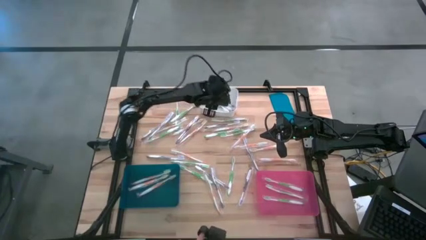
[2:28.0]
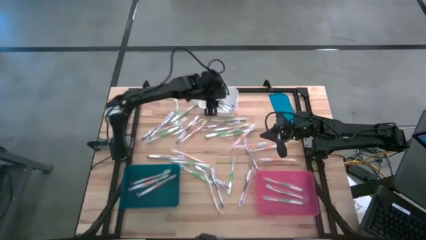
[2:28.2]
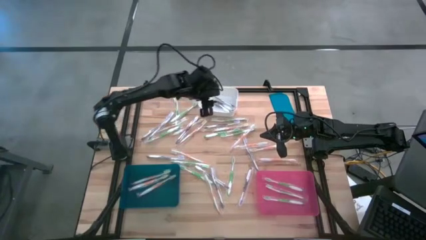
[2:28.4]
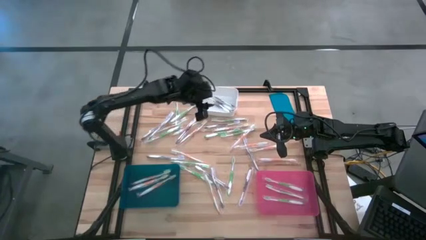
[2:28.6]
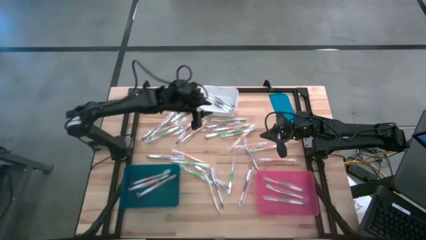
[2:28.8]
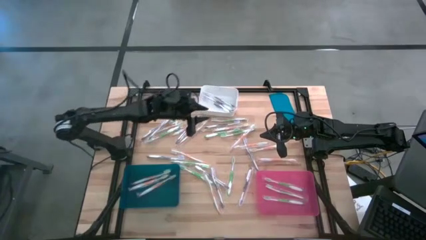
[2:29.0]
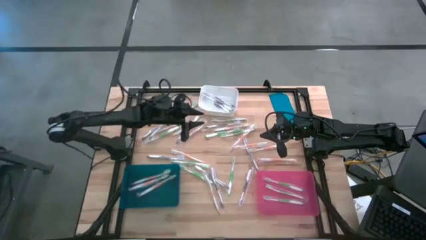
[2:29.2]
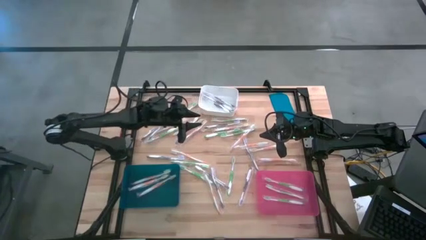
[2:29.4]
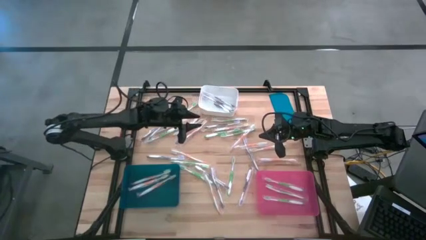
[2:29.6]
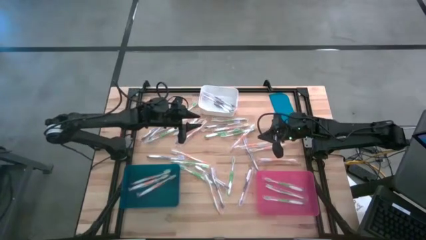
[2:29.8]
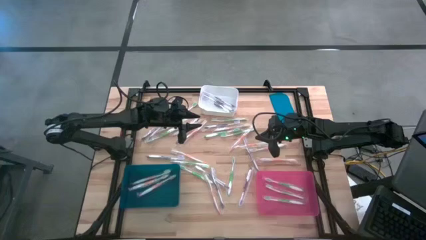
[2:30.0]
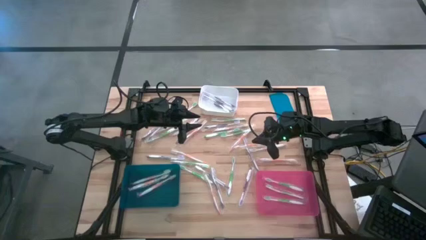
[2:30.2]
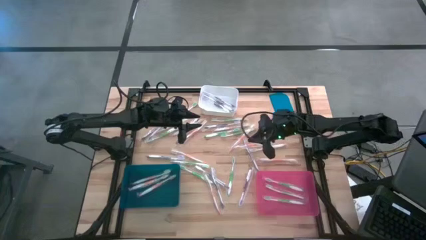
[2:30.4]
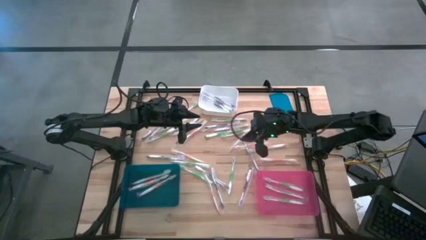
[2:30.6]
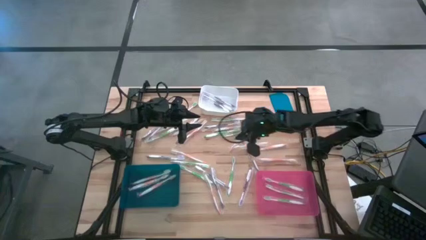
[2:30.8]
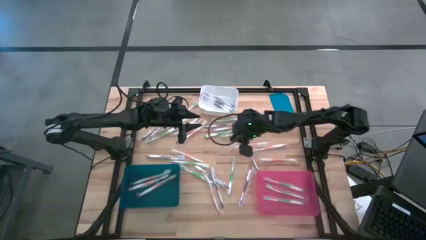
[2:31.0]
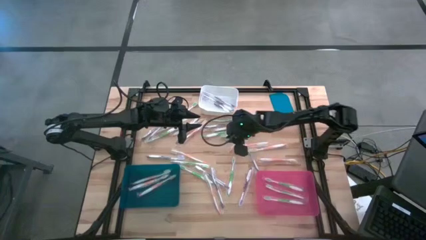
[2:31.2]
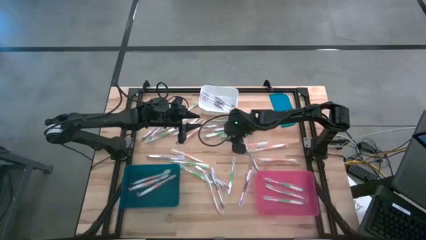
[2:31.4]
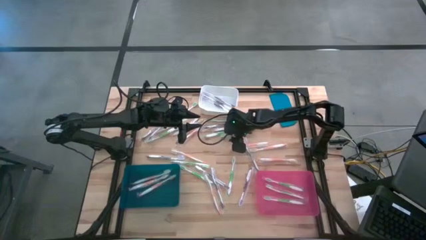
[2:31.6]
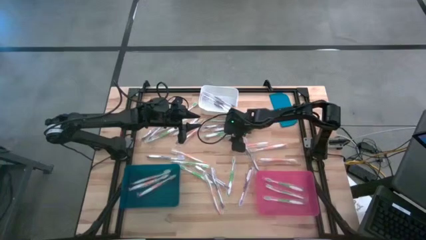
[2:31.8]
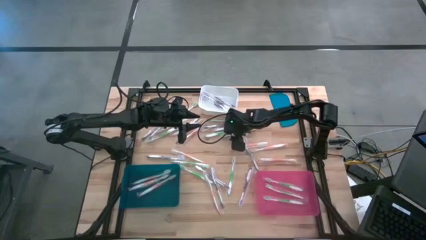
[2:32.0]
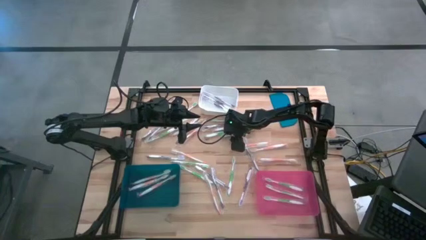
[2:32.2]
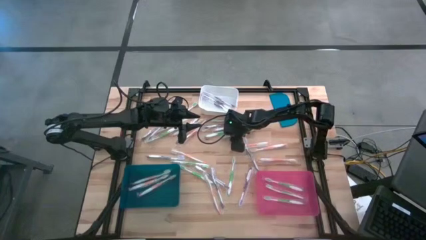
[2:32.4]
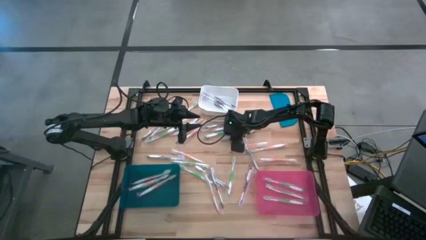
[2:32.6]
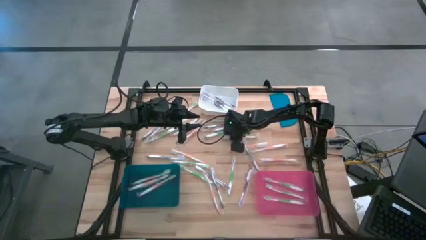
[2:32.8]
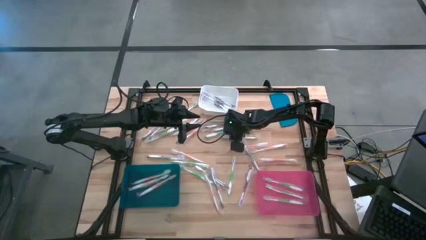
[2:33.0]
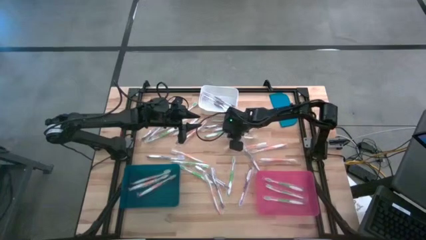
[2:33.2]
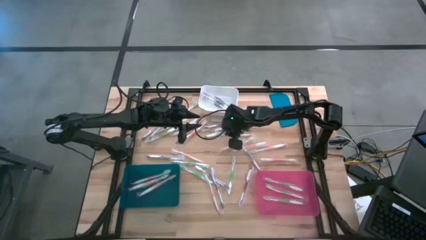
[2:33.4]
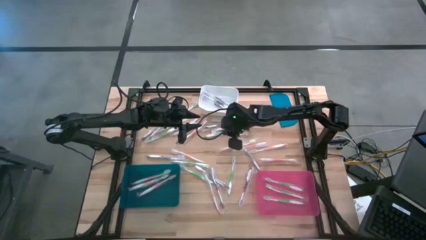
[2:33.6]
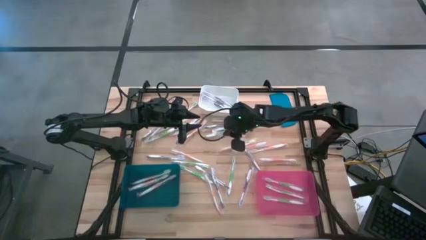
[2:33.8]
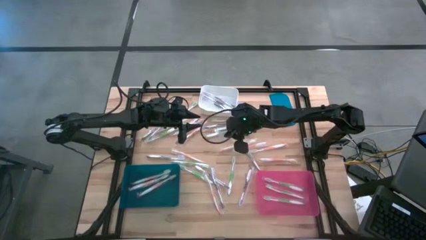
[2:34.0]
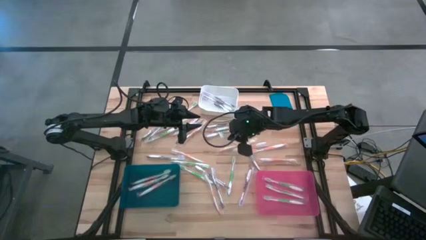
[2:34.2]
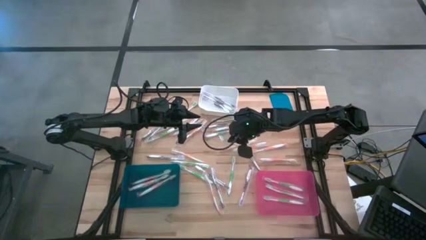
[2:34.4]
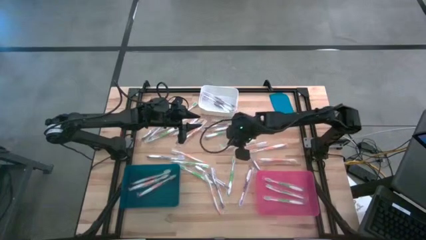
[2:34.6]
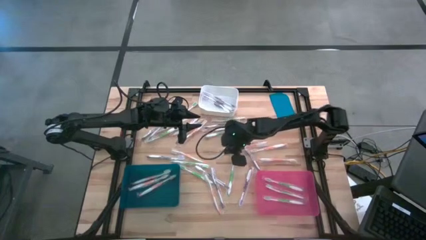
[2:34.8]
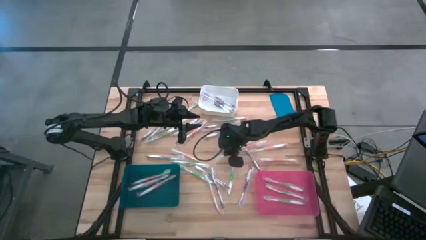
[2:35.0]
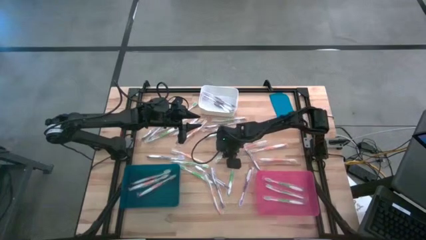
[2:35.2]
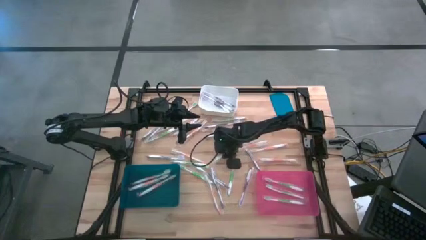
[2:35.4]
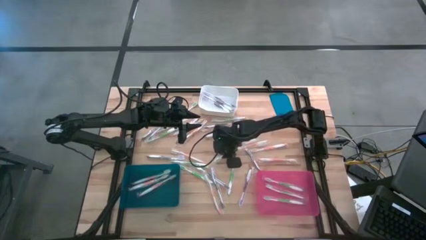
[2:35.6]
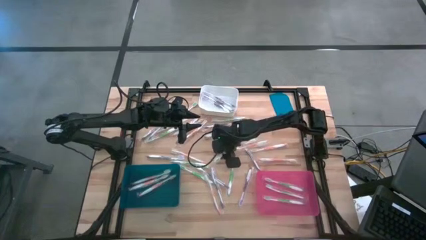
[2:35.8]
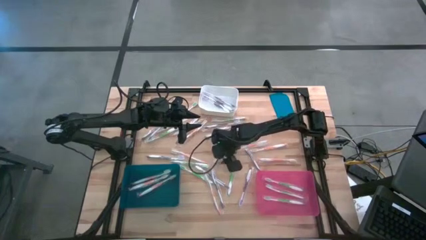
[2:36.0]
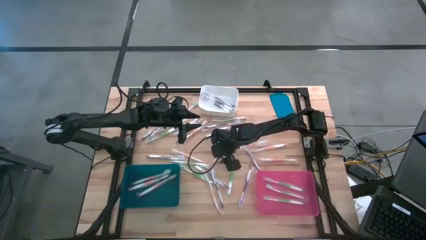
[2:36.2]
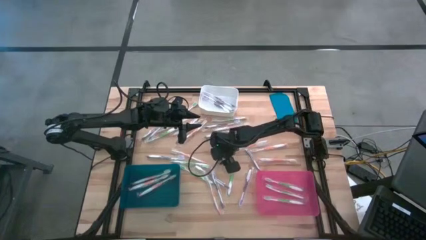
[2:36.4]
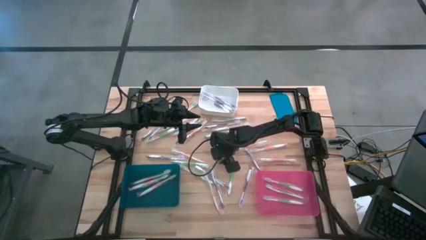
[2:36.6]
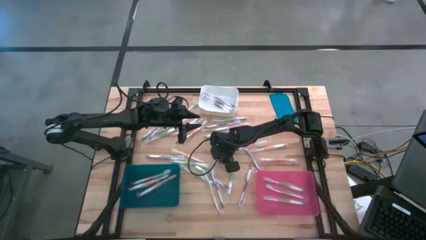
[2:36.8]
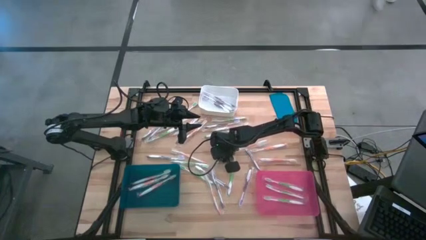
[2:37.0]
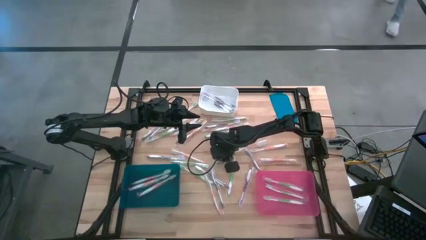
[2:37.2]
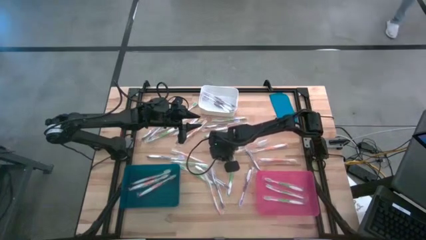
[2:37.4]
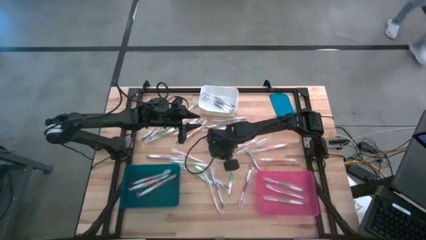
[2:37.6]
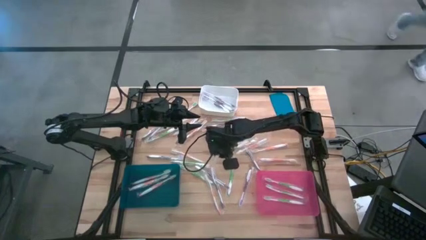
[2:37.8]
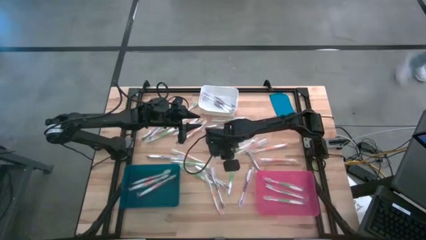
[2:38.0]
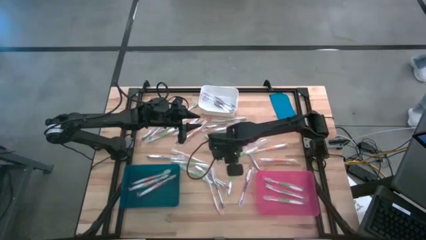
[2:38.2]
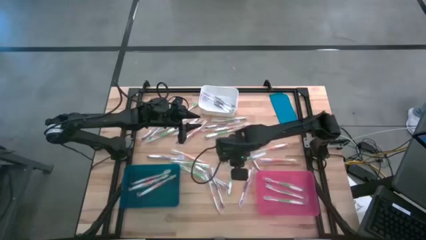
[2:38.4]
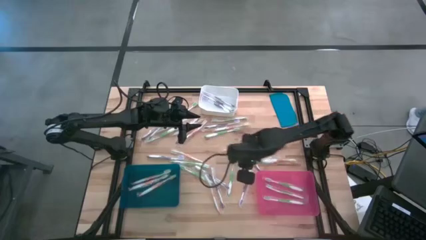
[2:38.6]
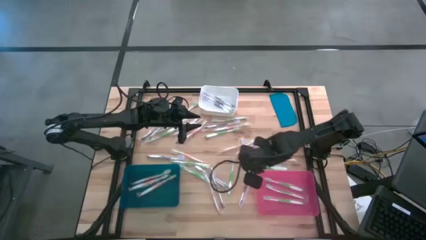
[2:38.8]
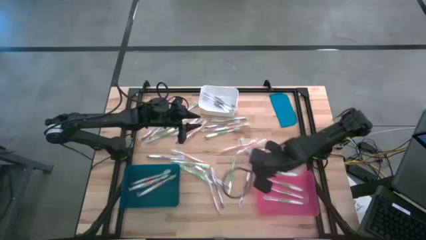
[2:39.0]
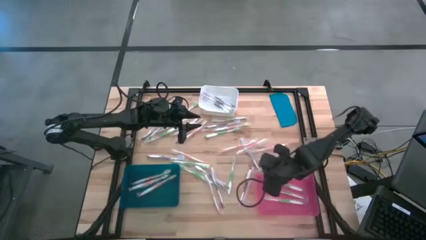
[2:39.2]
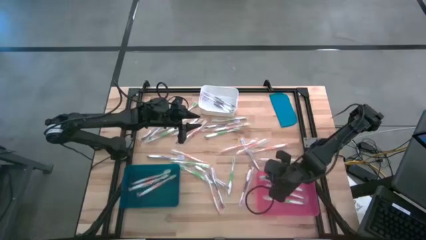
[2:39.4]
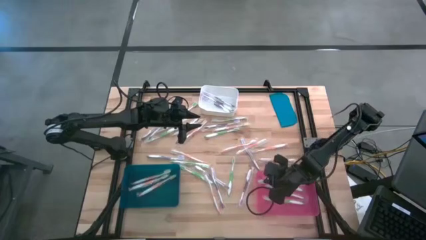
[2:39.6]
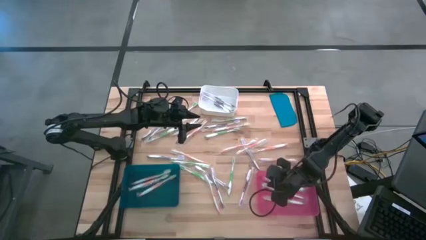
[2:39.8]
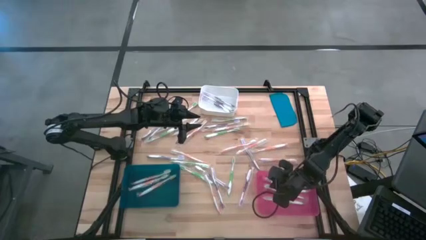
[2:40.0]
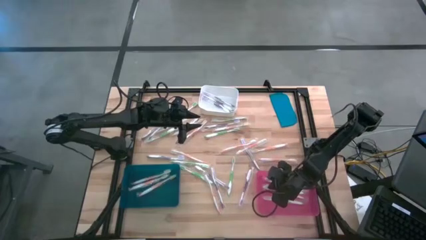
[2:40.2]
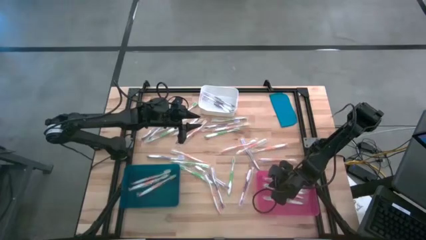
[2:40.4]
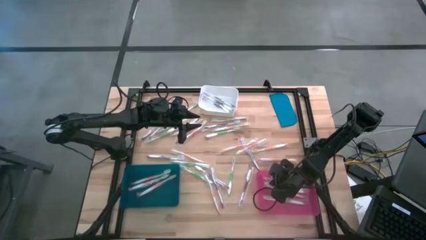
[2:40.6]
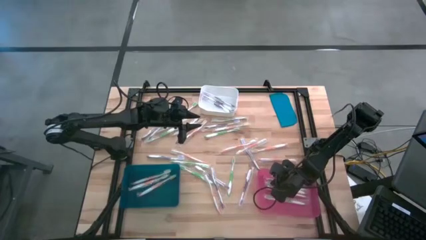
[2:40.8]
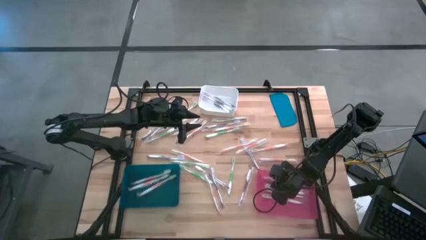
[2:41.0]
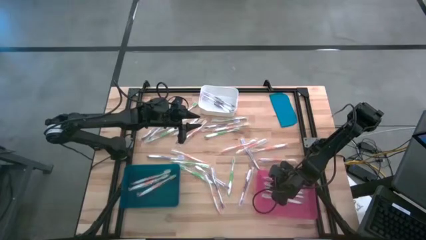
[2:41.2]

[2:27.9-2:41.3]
Task: Pick & Place Toothbrushes
Put the green toothbrush into the pink bin
